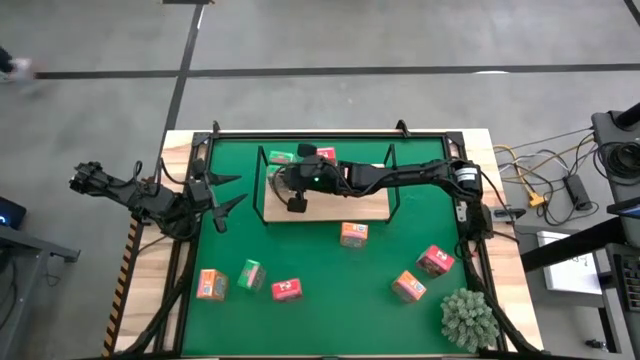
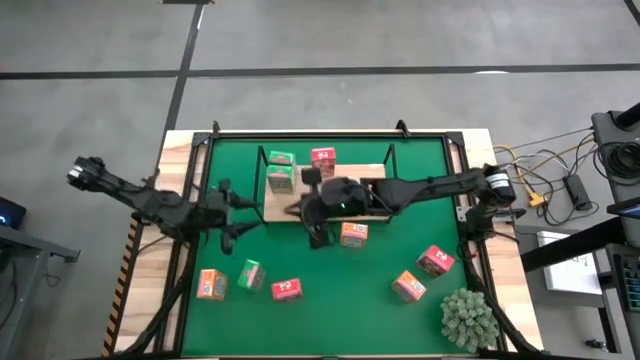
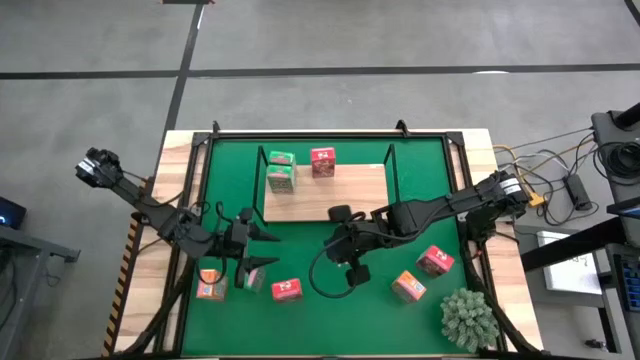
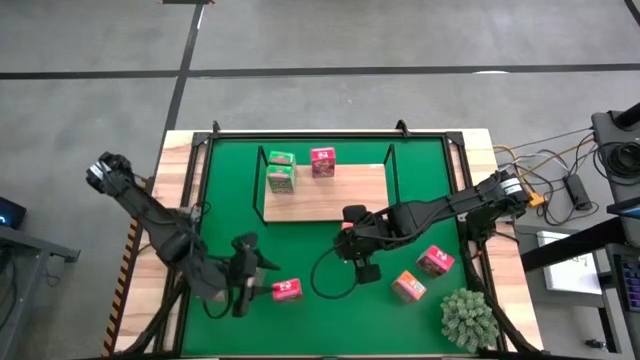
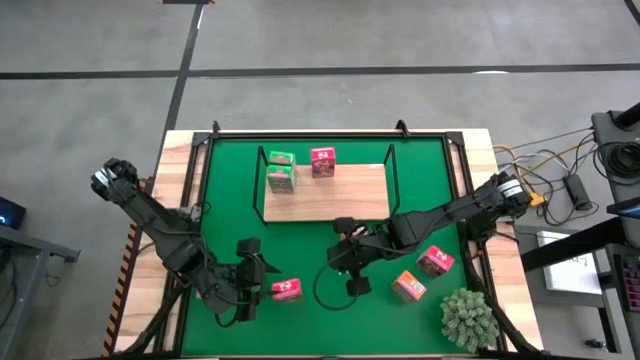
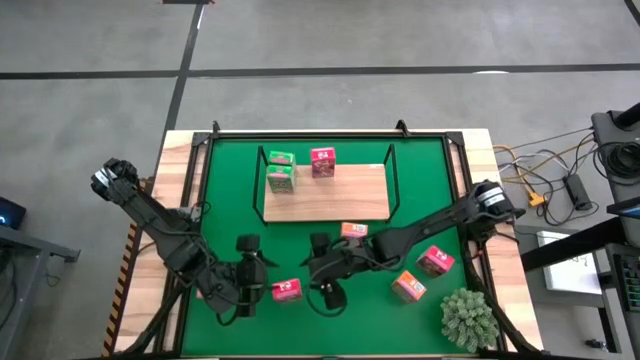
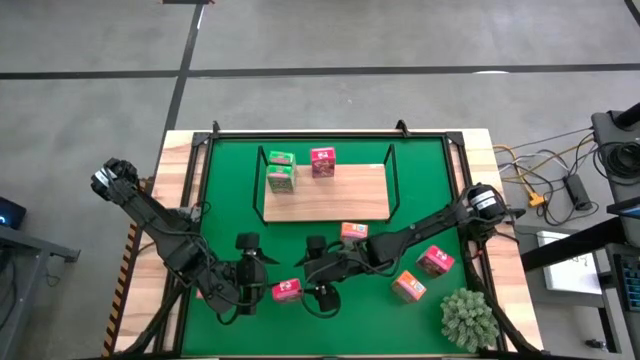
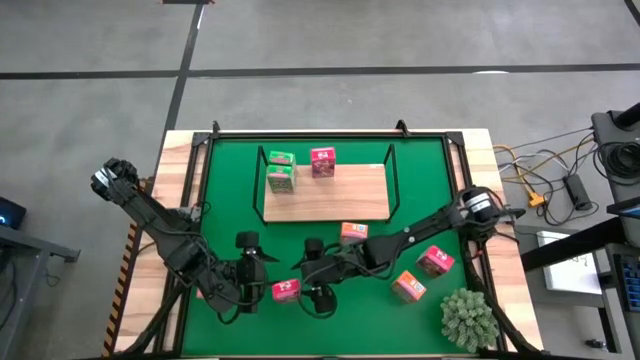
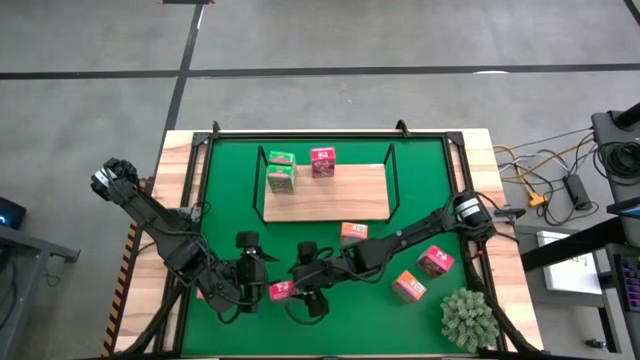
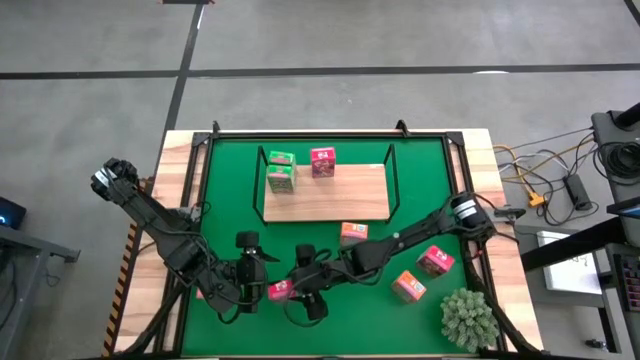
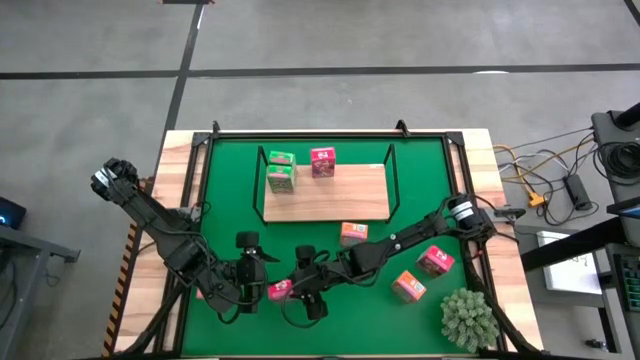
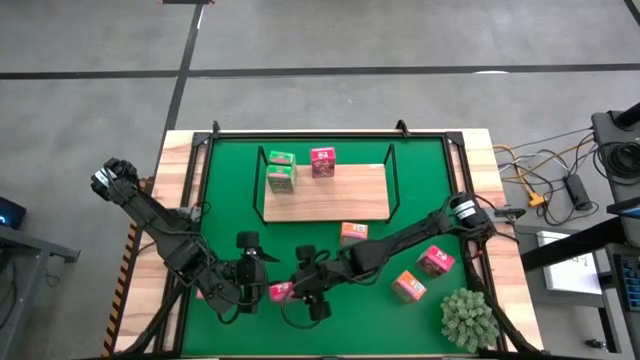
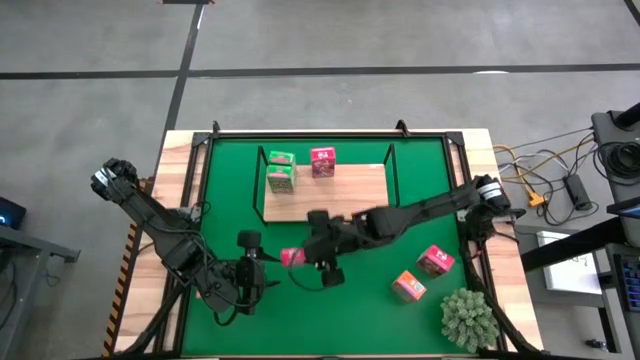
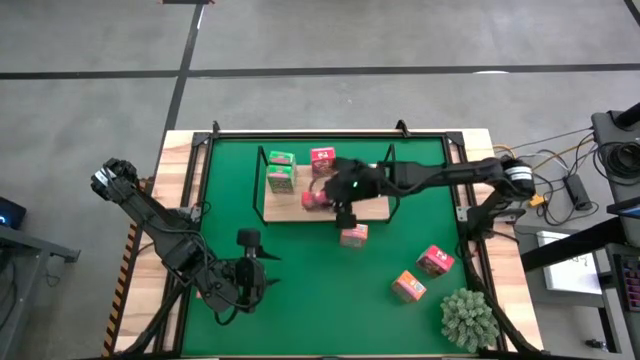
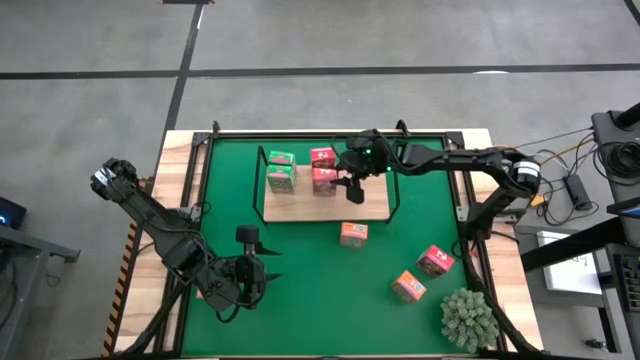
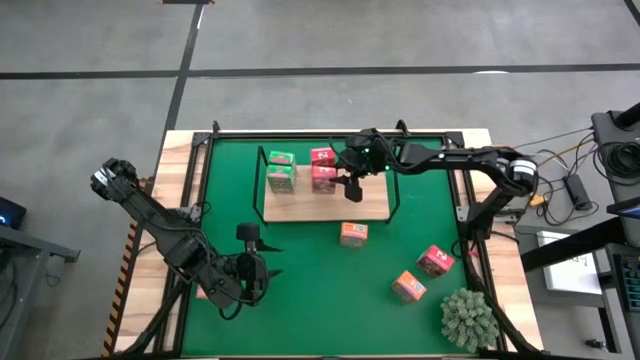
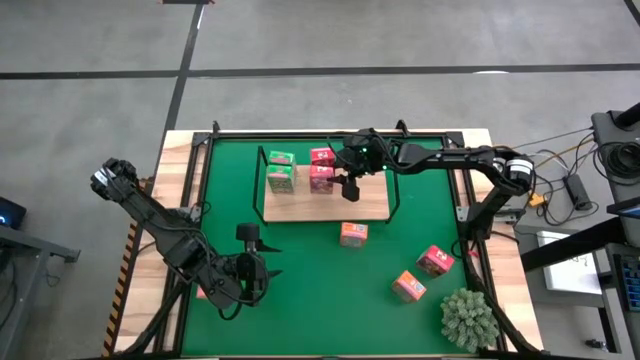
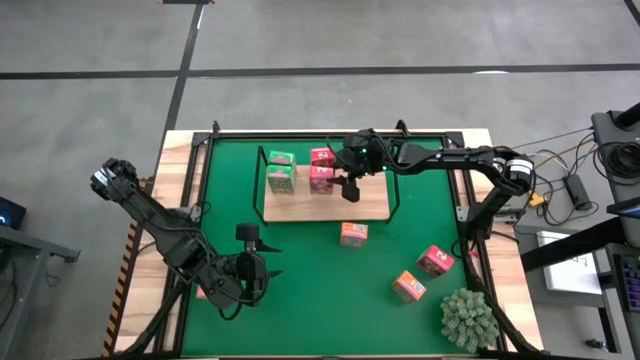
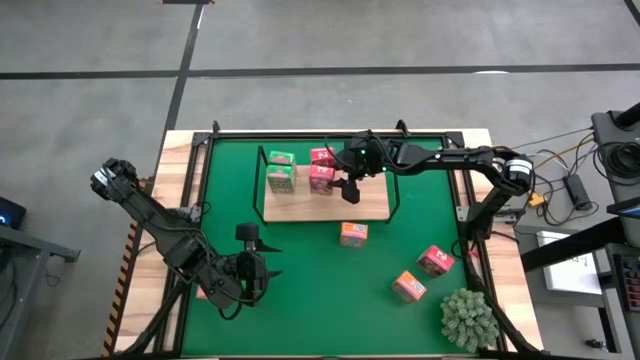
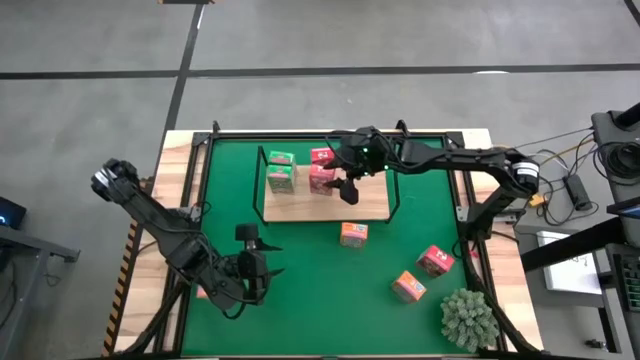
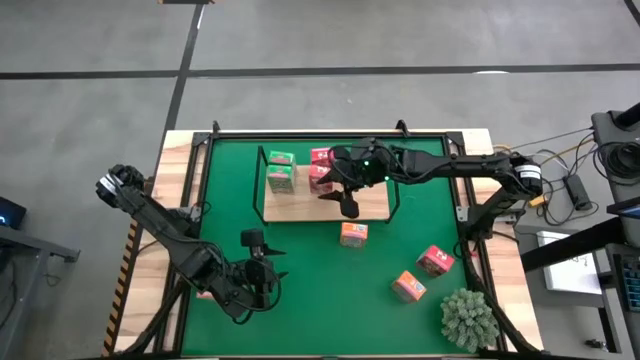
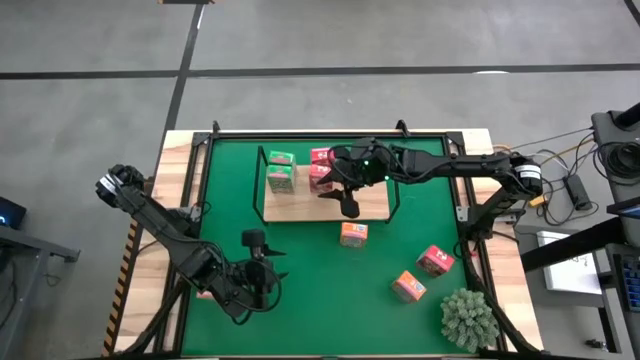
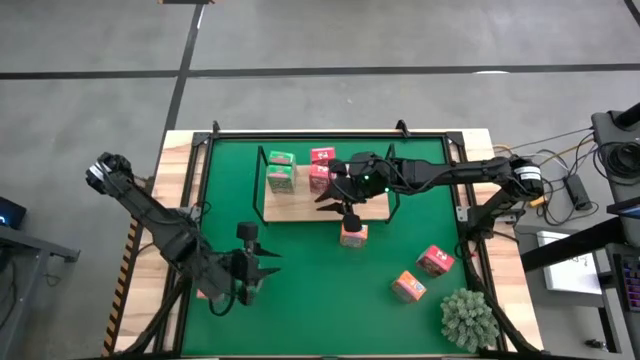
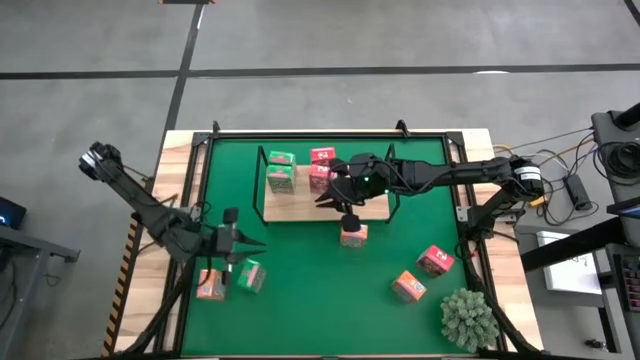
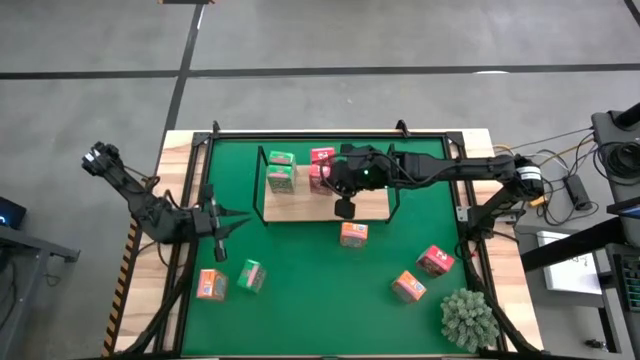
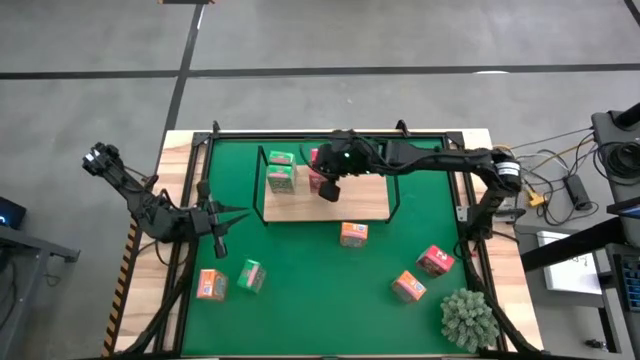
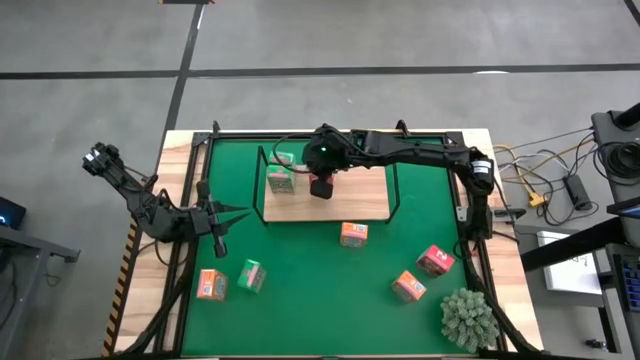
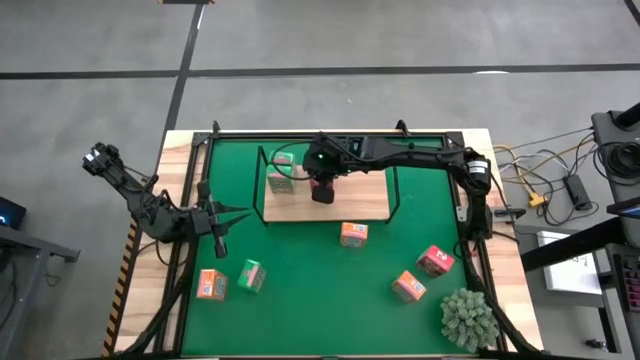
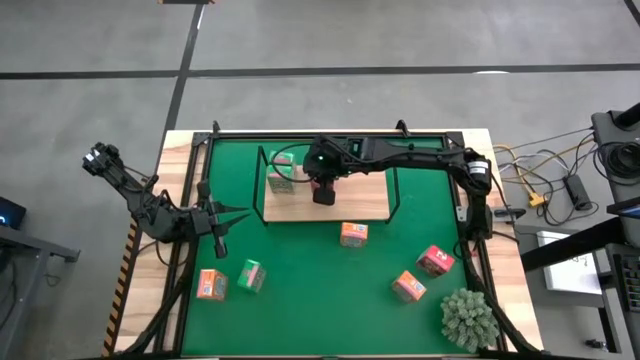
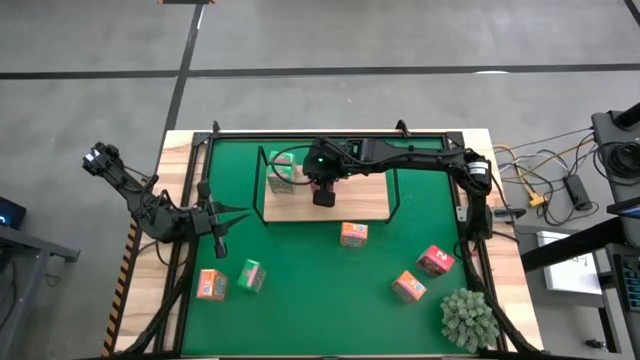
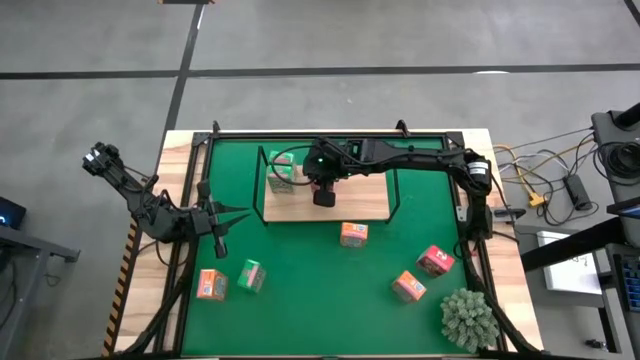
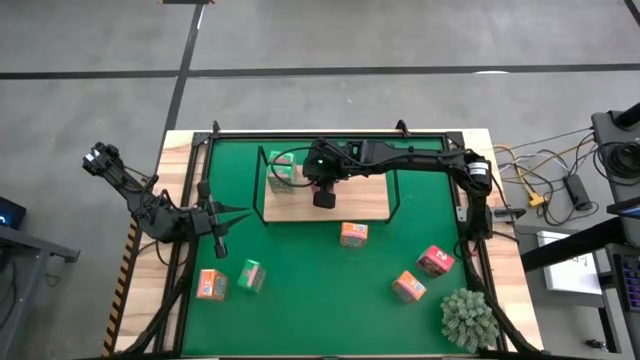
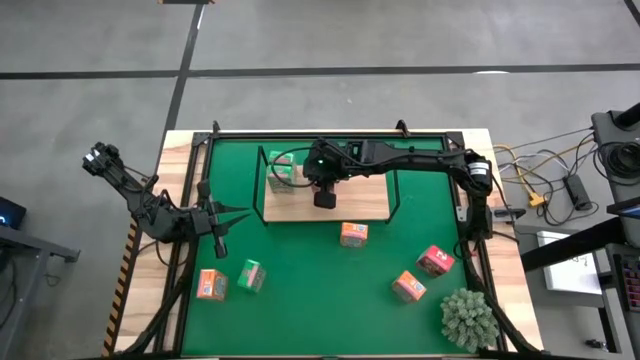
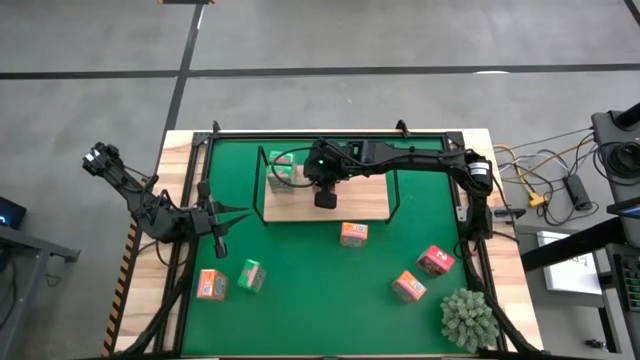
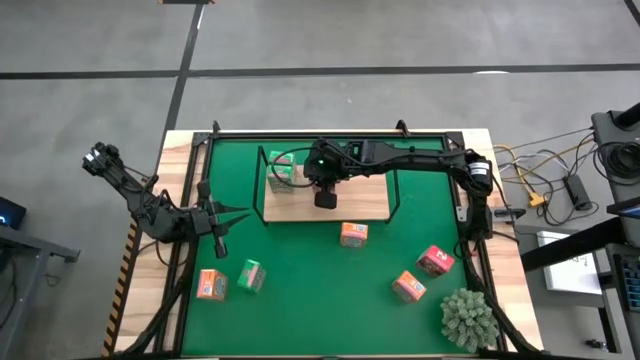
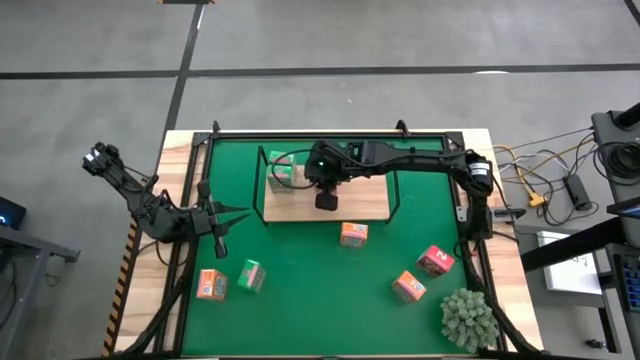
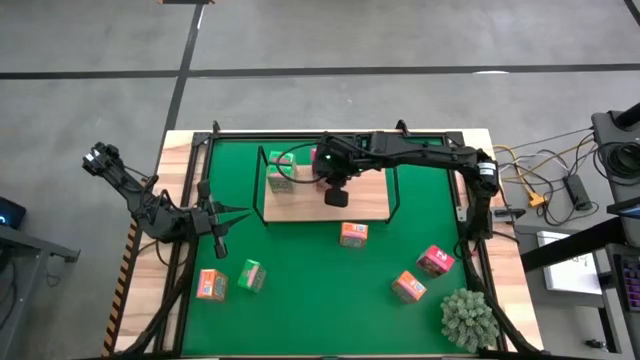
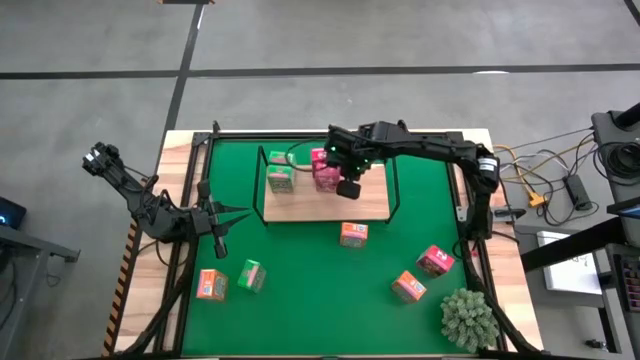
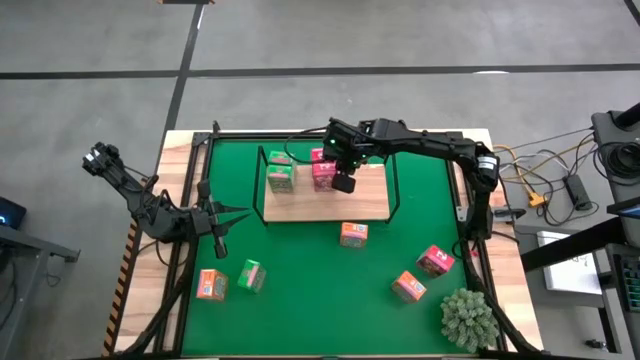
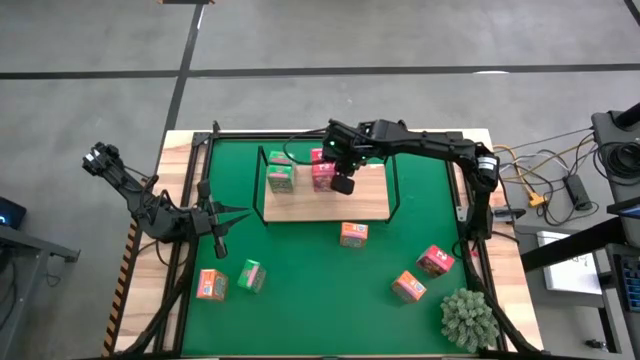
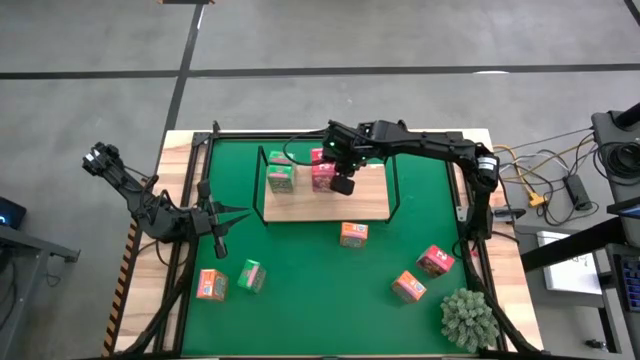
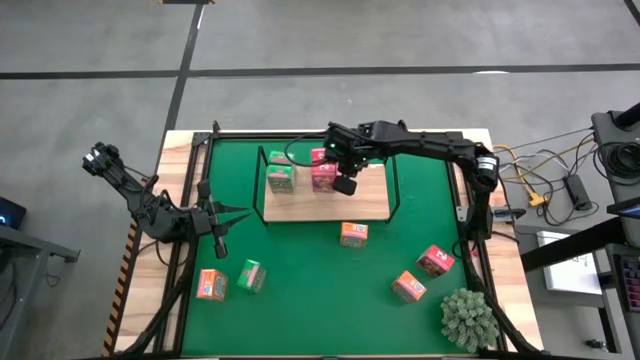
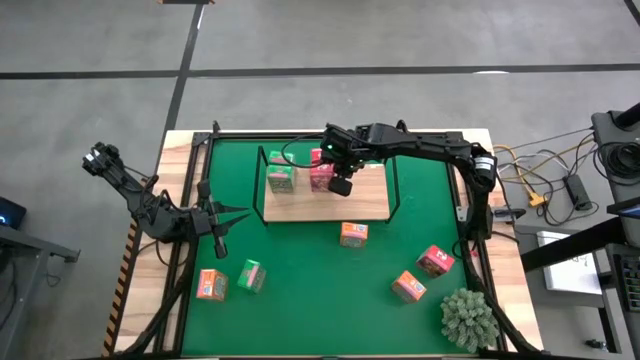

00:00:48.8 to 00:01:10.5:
Task: Stack cereal on shelf
Put the left red cereal box on the shelf aligned with the other red cereal box
